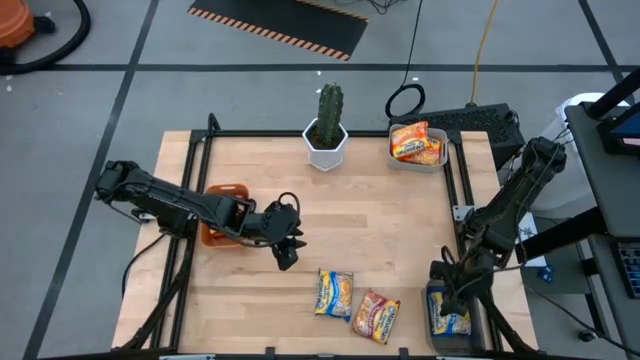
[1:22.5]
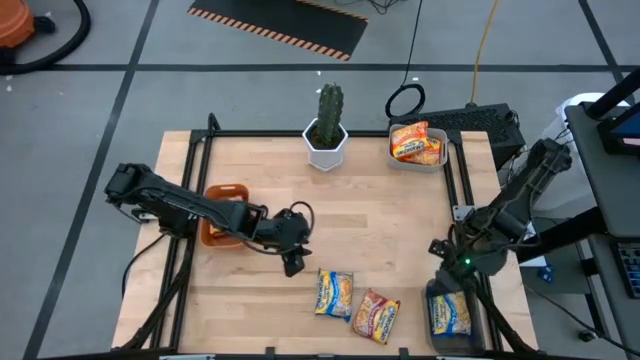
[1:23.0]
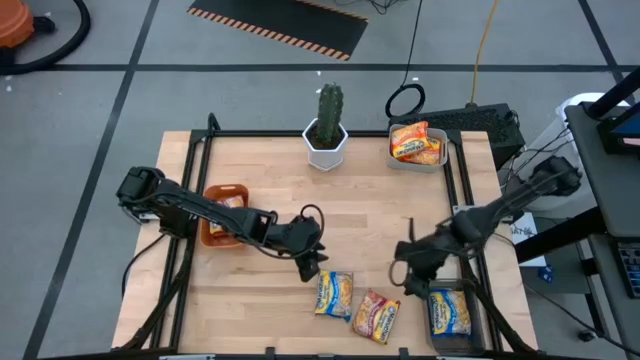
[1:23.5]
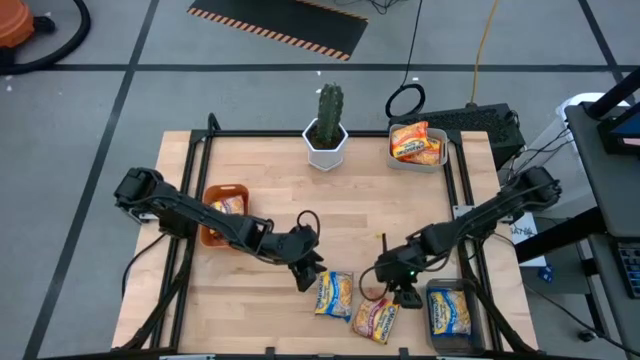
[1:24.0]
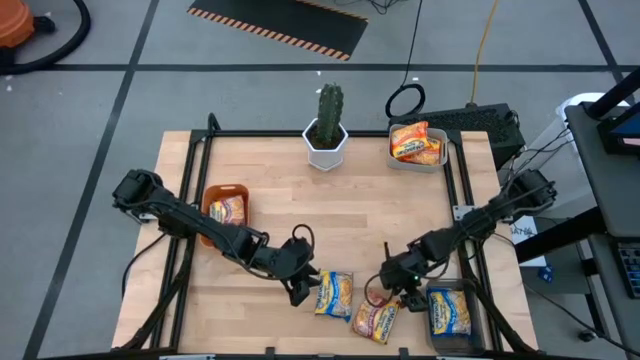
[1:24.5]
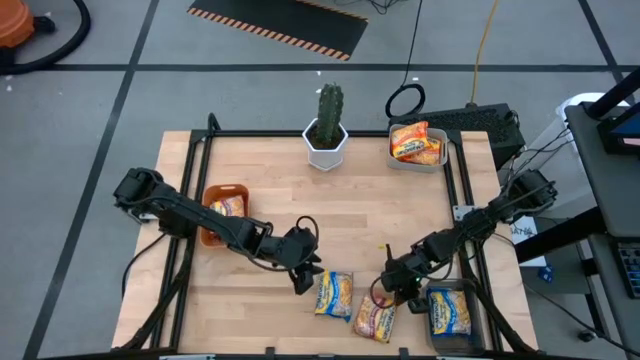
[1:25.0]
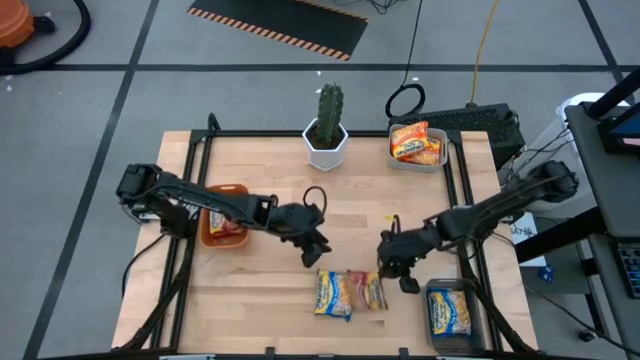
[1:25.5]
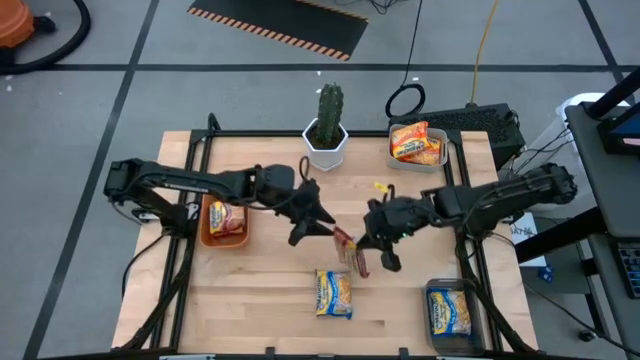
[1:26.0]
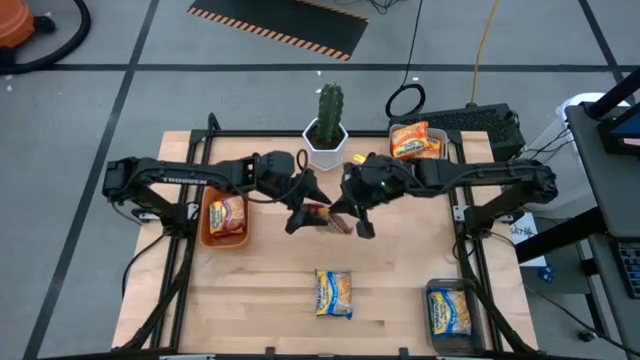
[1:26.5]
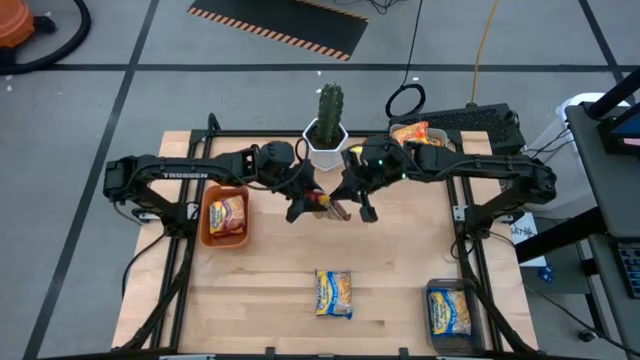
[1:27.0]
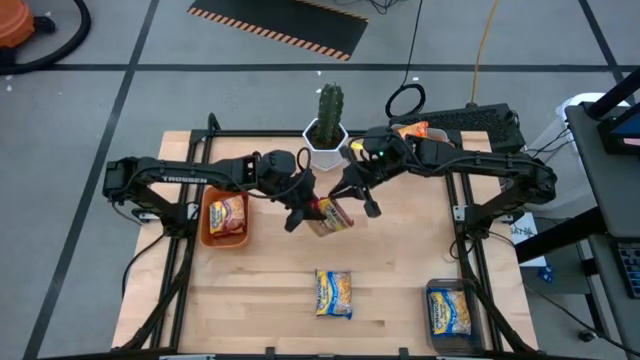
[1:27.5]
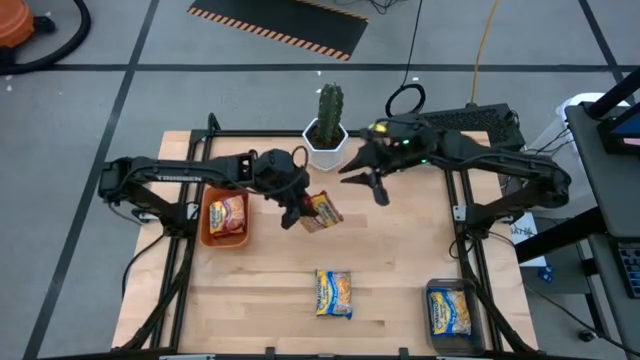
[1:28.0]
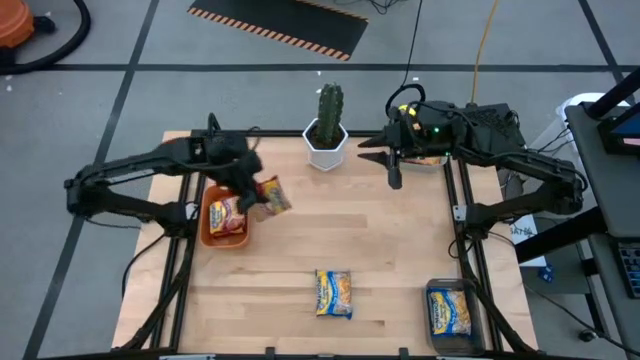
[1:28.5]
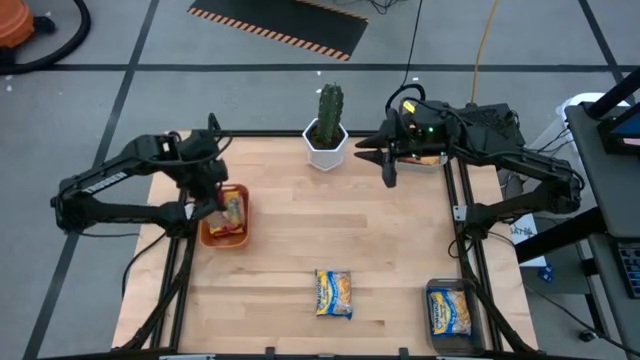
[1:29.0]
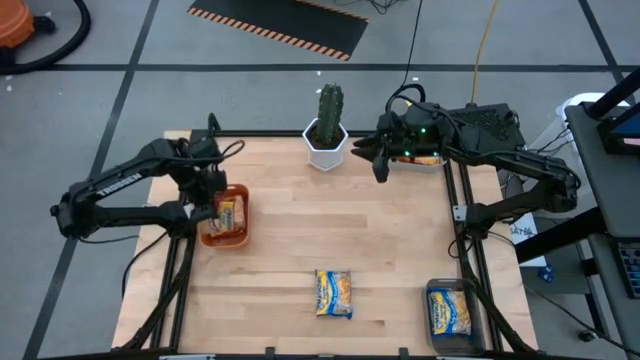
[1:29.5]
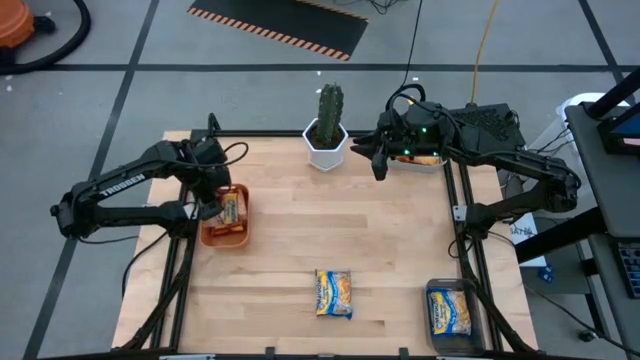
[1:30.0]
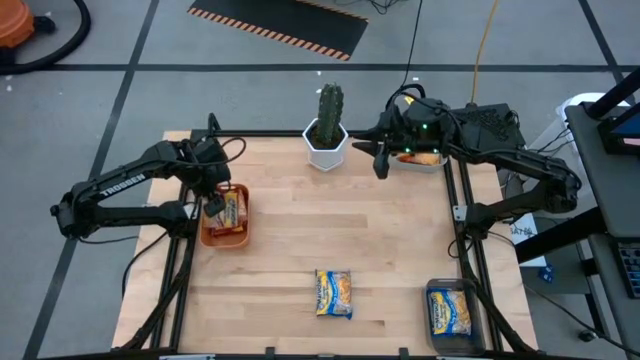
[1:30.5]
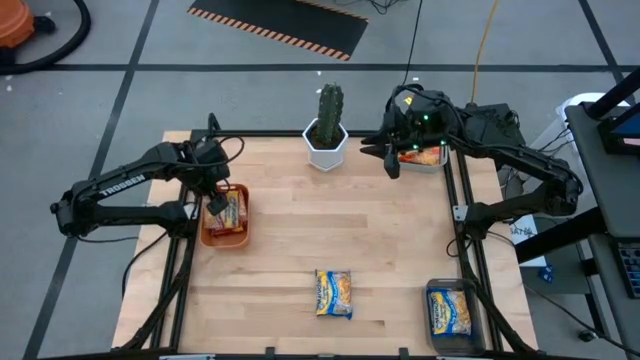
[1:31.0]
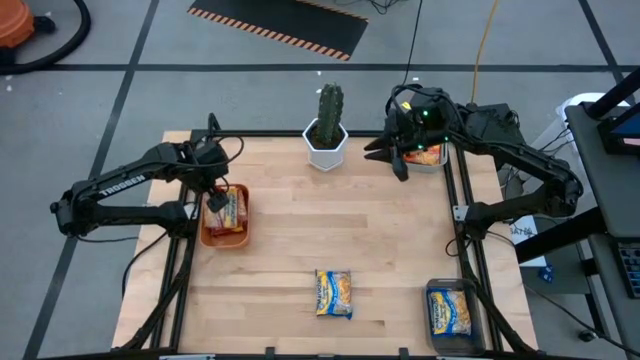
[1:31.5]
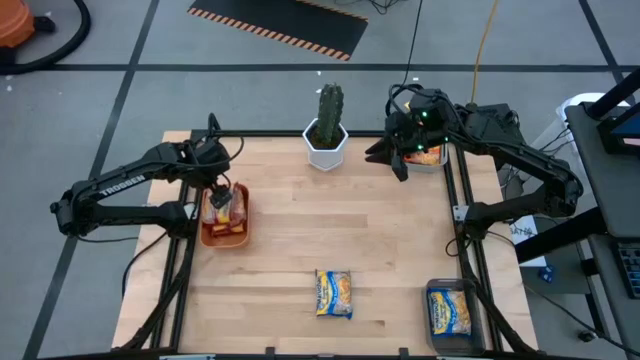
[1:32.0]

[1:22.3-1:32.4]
Task: Sort Maruchan noodles
Put the red noodle pack into the orange bin

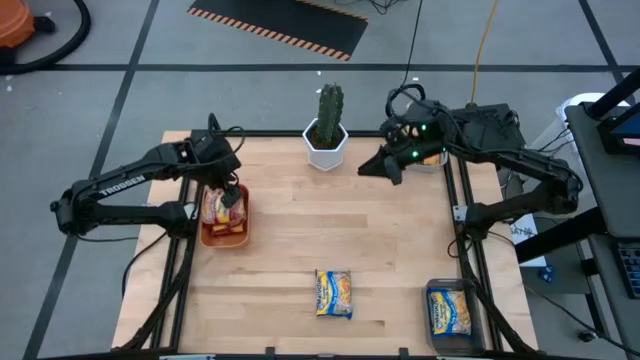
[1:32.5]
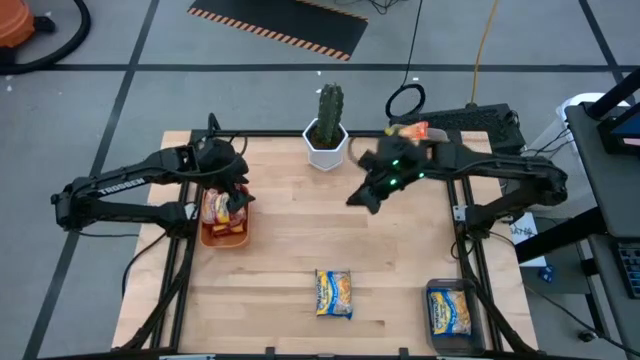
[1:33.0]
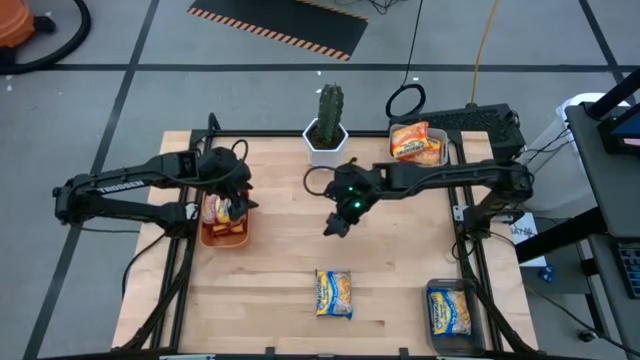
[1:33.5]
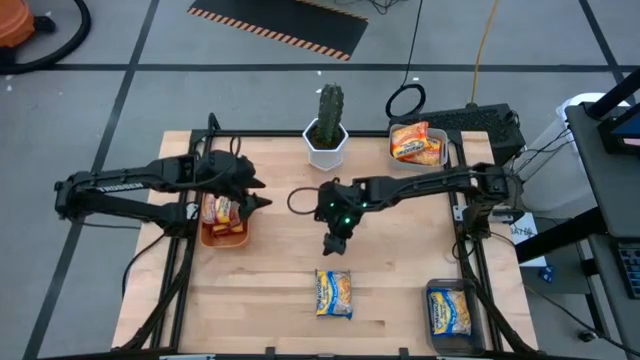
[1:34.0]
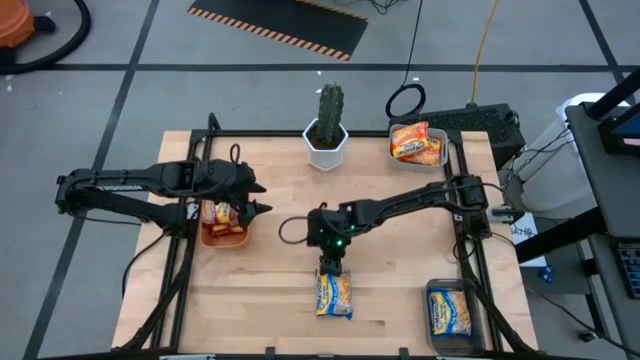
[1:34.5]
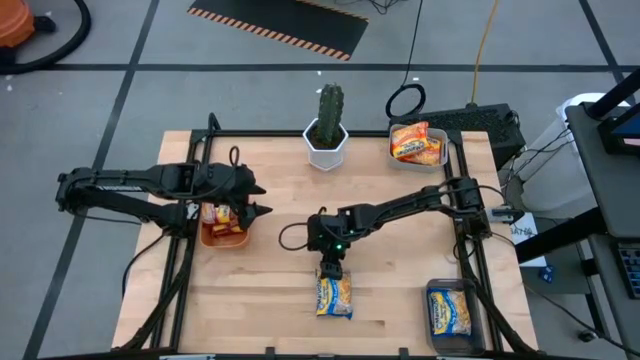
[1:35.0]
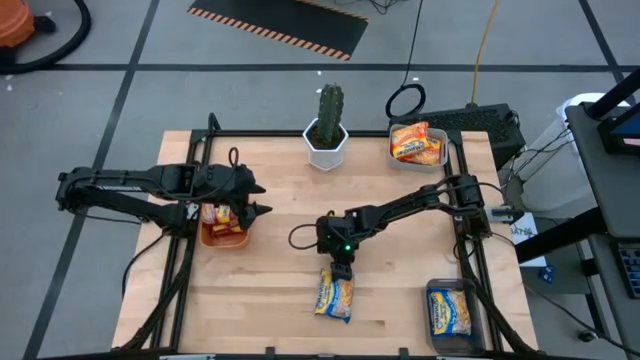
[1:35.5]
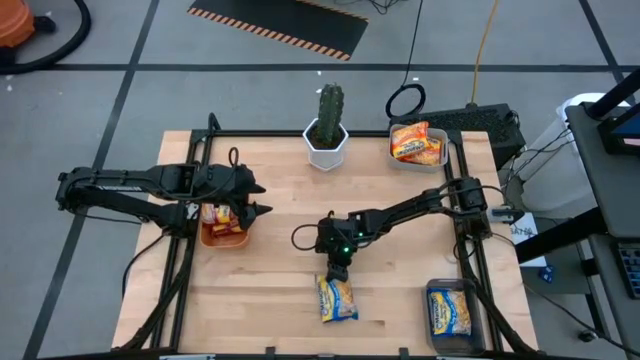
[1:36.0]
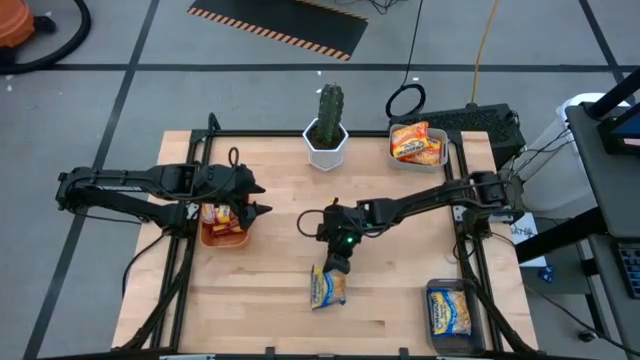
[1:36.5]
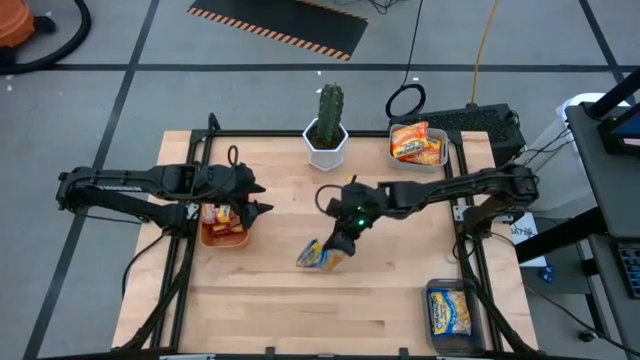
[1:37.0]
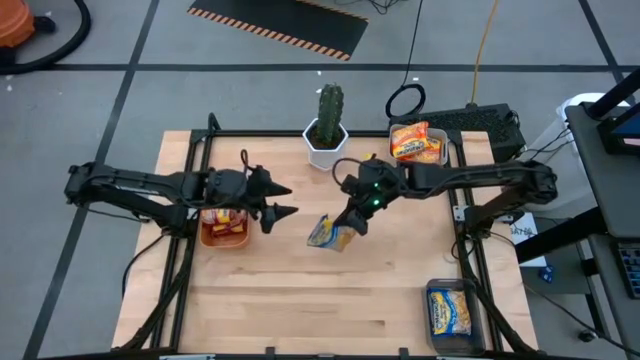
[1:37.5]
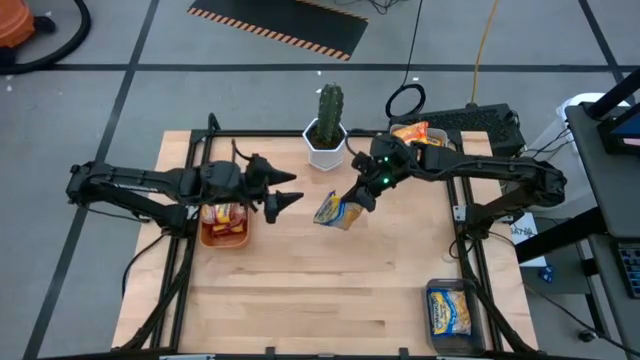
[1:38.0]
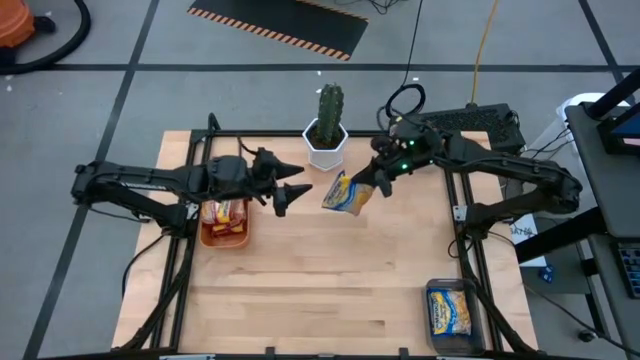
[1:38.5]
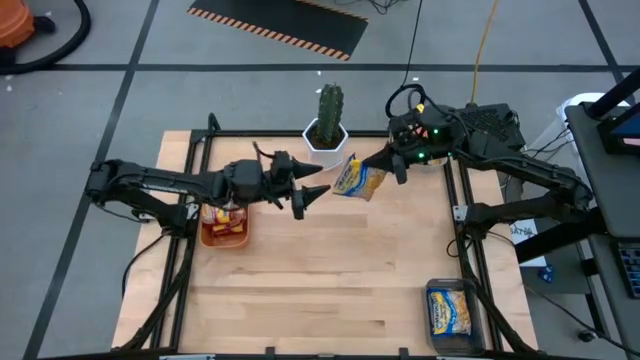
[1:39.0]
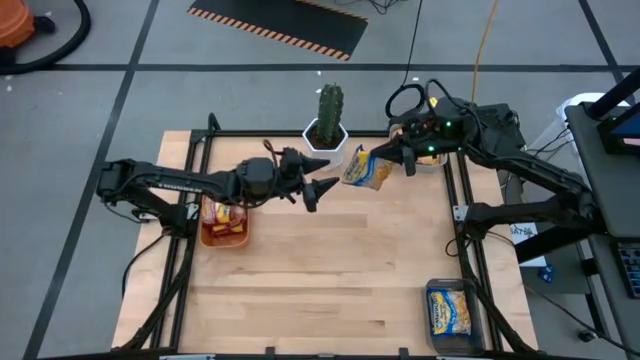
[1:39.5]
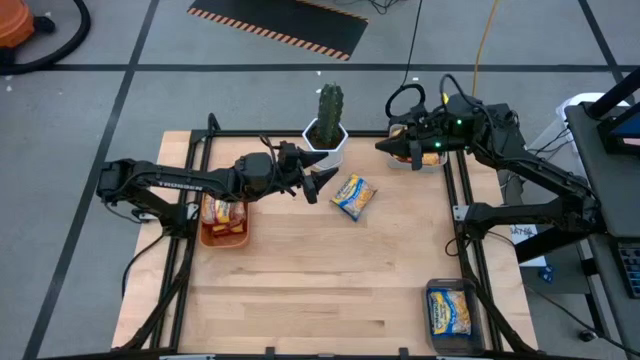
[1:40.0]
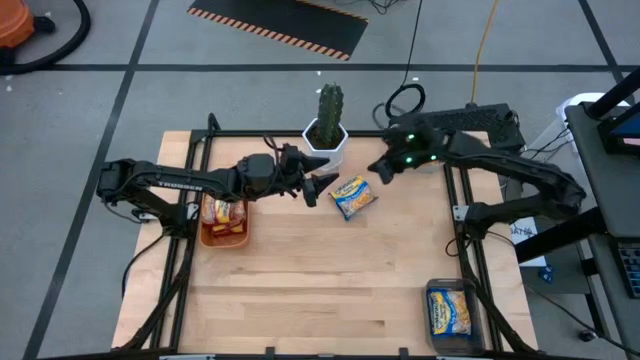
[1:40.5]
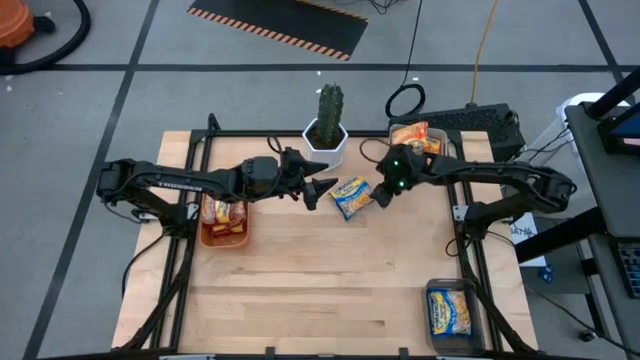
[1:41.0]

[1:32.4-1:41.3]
Put the blue noodle pack into the black bin

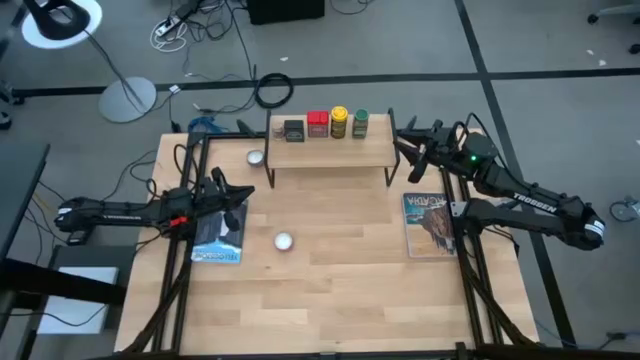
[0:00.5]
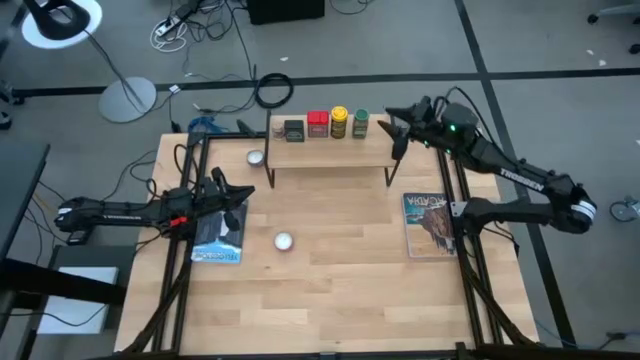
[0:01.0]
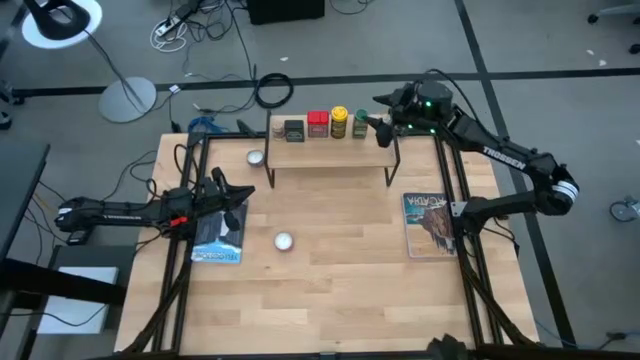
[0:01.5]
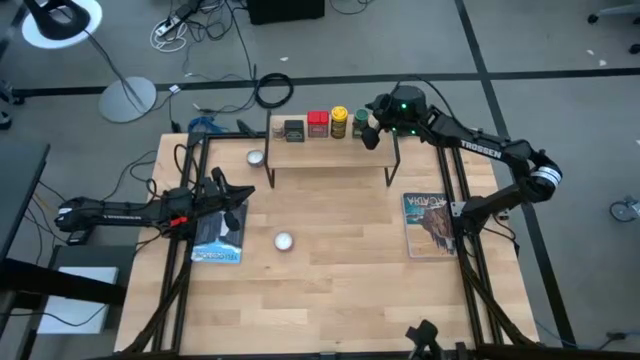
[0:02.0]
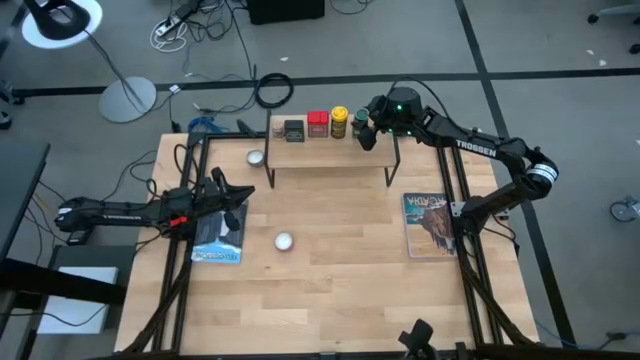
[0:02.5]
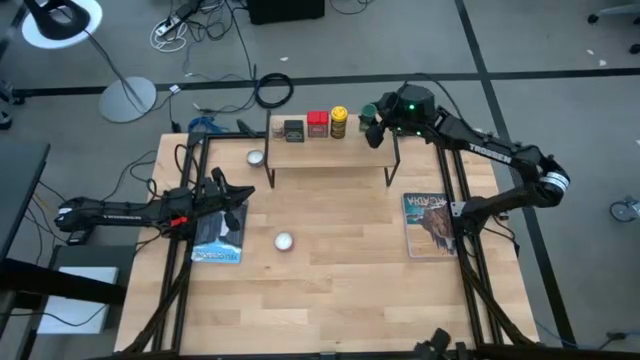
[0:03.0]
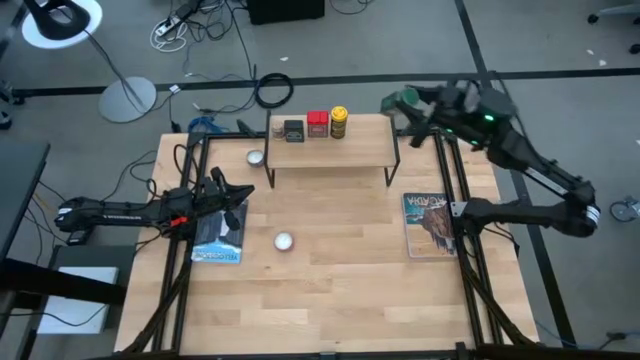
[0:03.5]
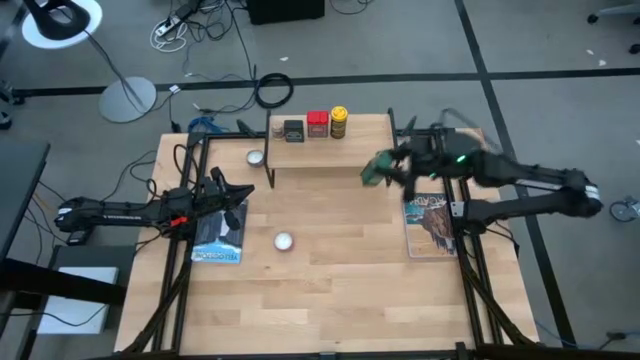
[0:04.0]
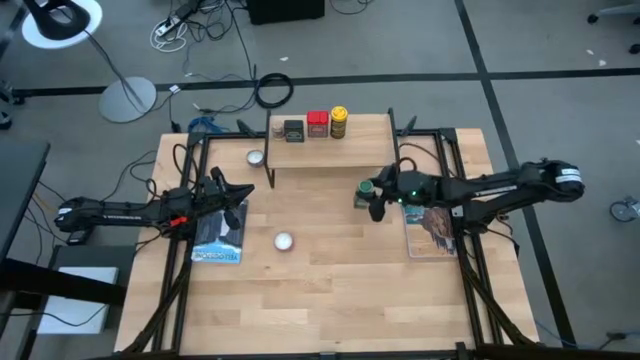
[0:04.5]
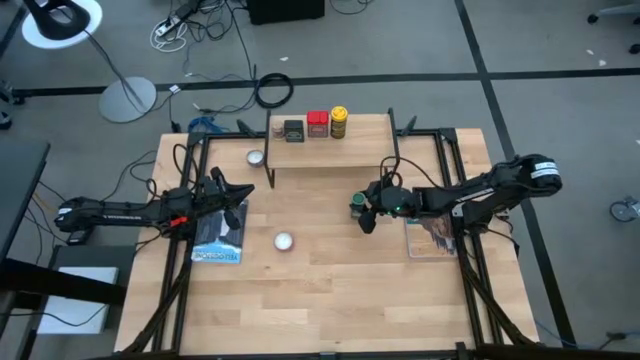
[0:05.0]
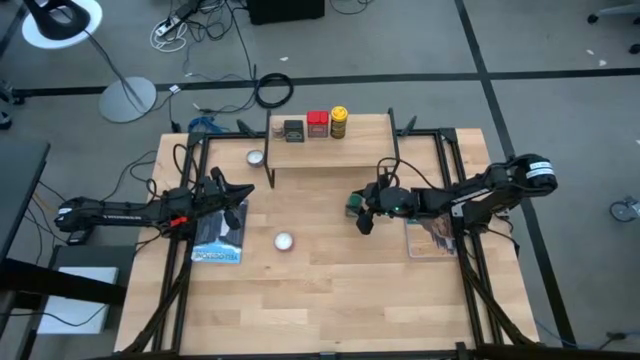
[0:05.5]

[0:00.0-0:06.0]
Task: Shelf spices
Remove the green seasoning bottle from the shelf
